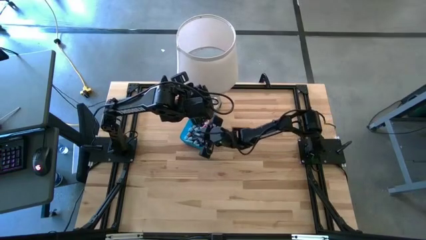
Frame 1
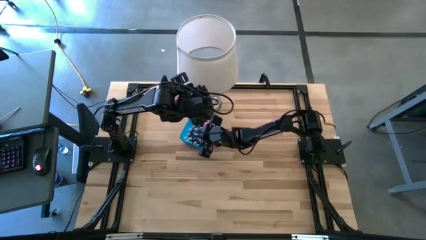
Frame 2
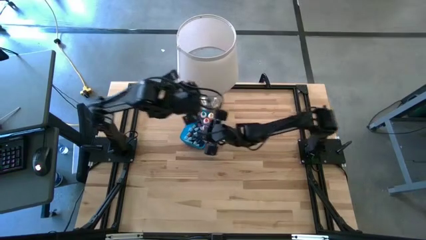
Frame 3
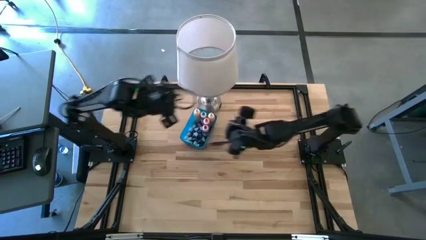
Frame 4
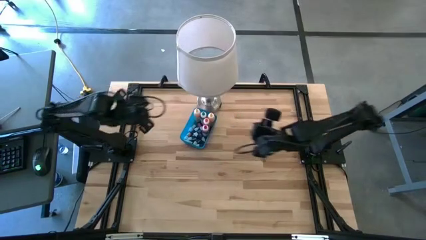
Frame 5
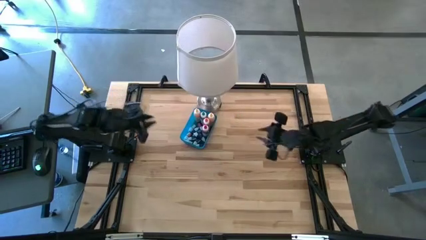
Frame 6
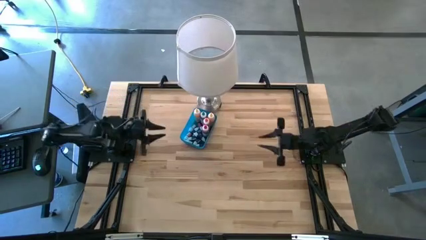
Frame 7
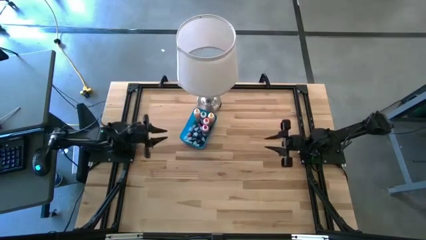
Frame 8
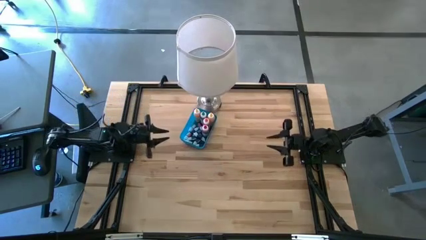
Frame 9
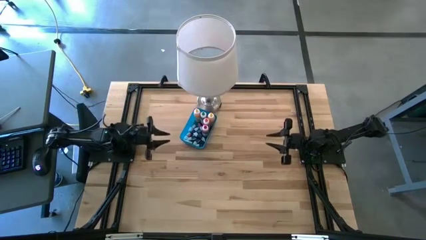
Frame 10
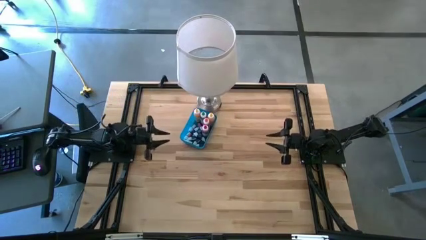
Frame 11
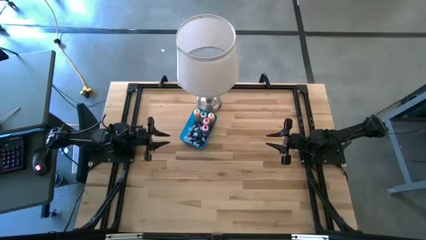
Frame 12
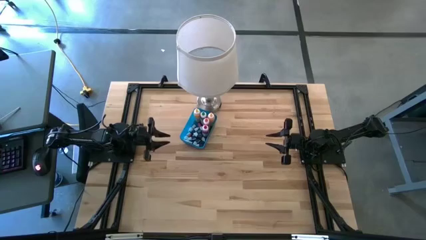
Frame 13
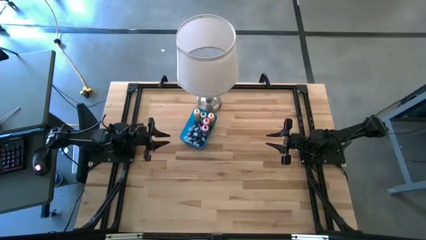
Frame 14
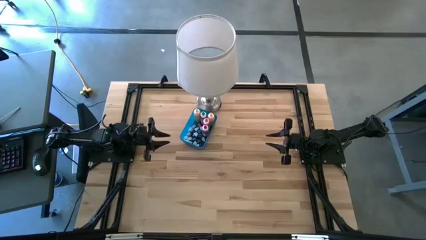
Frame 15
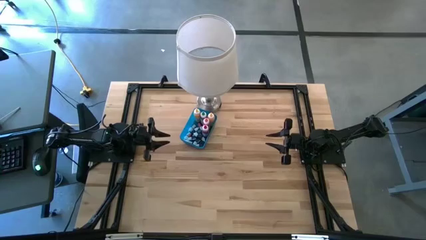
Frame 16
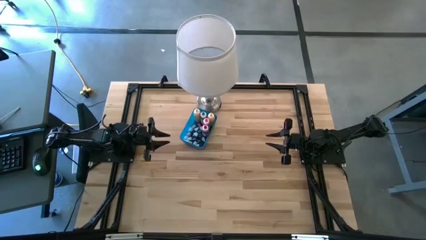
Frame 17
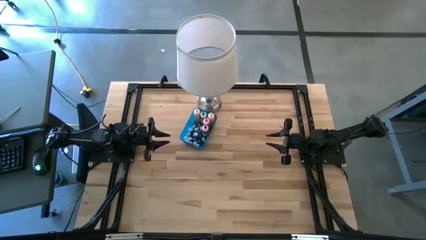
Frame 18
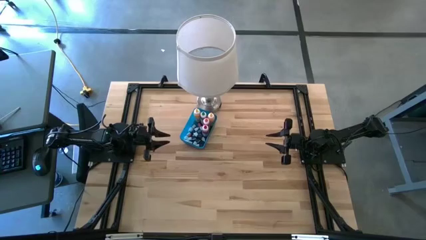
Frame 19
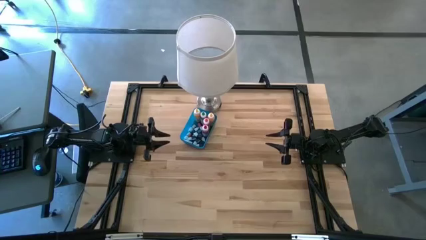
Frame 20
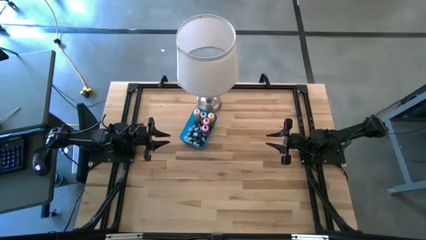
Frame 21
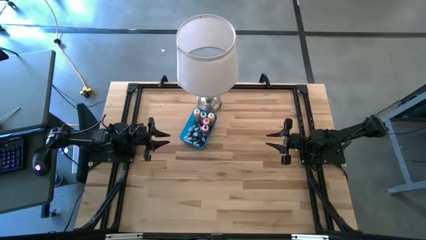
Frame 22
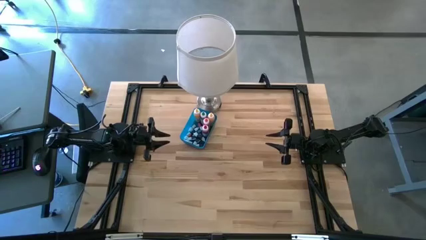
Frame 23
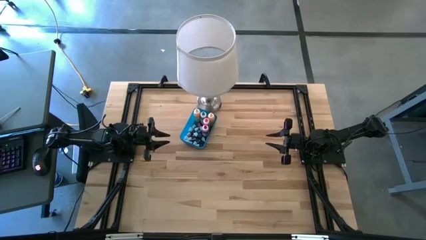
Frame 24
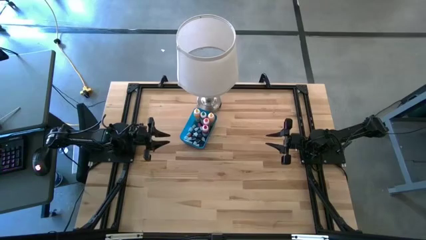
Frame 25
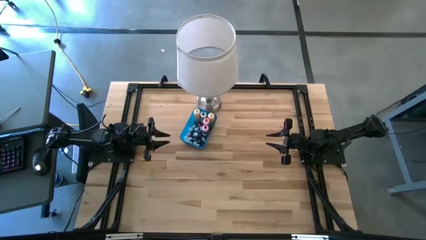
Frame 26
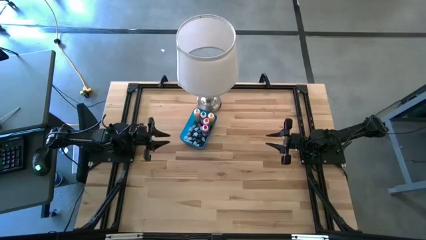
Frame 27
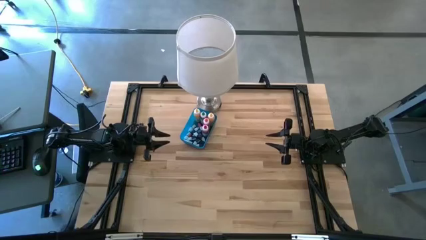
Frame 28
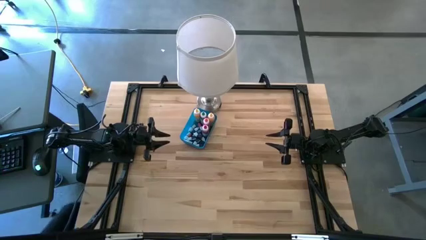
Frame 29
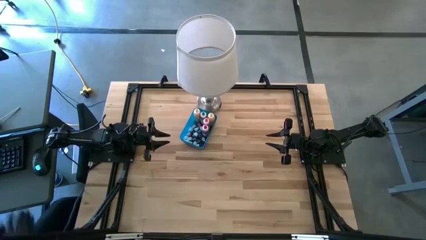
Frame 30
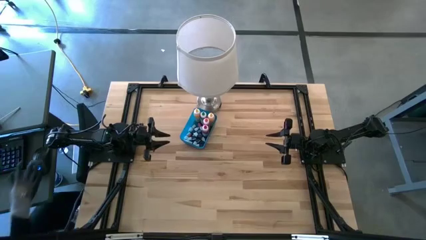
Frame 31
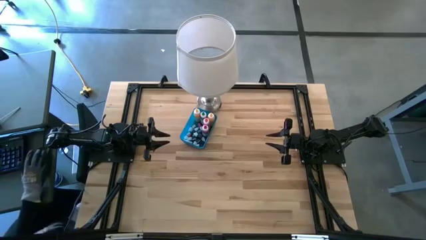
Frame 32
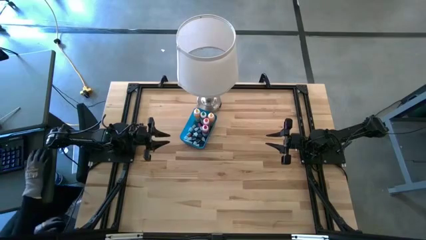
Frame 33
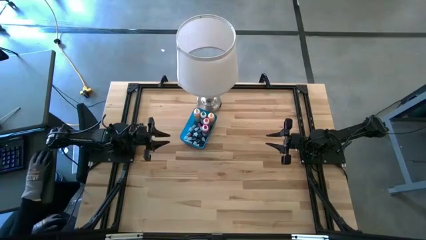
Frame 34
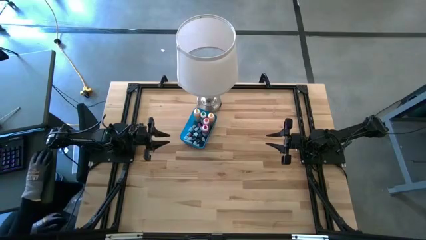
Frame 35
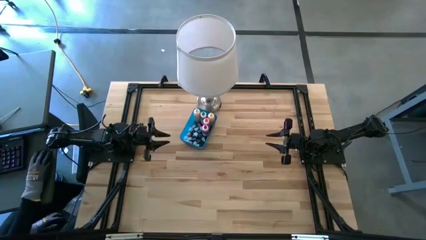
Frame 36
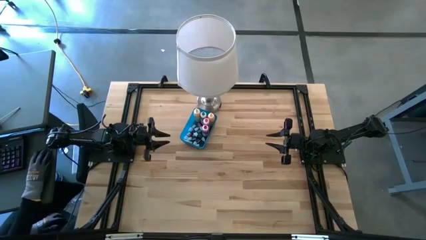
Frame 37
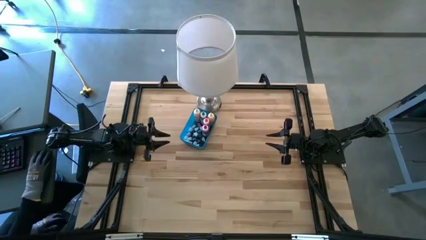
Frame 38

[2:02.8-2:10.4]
Task: Pick & Place food coloring
Return to Home Position

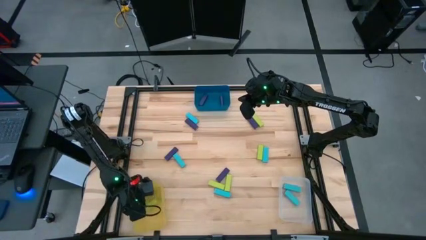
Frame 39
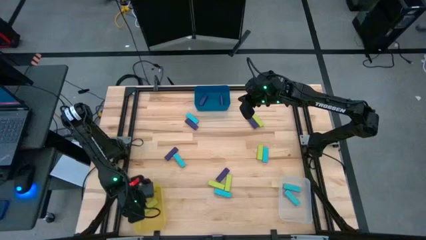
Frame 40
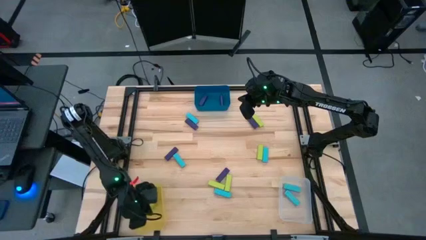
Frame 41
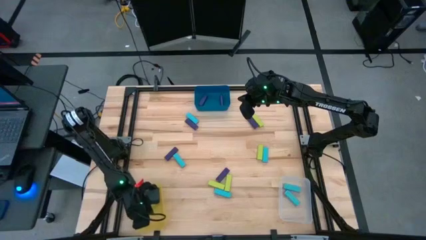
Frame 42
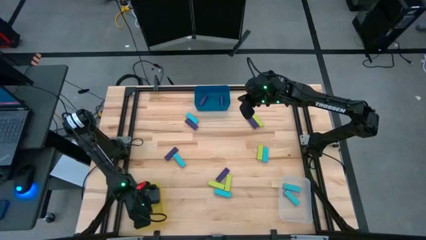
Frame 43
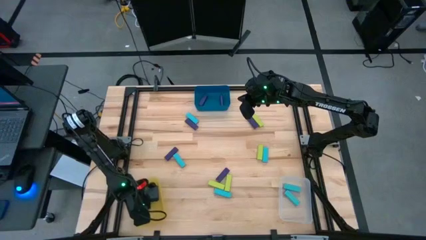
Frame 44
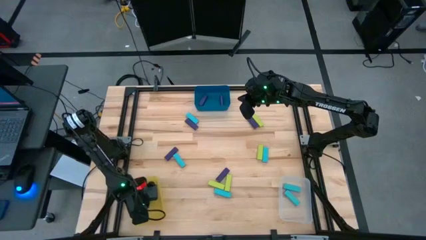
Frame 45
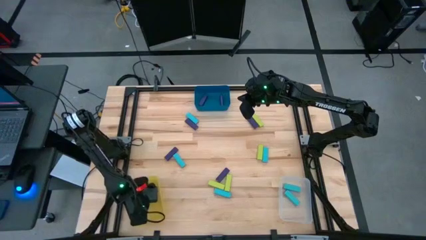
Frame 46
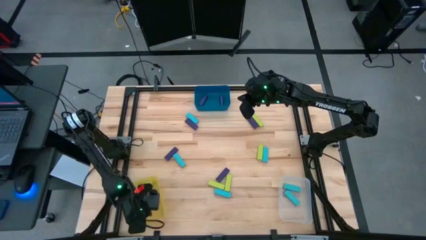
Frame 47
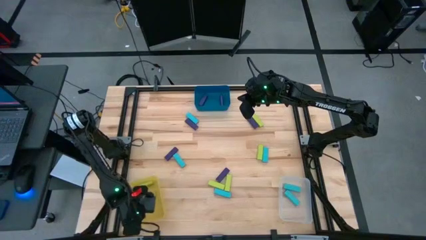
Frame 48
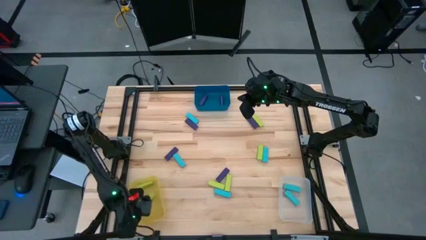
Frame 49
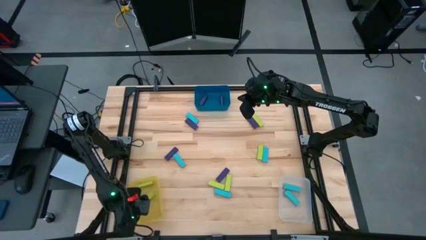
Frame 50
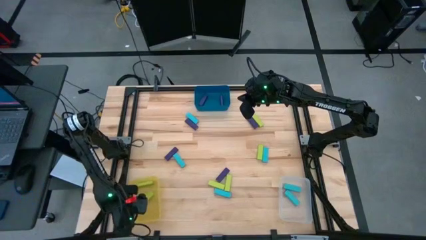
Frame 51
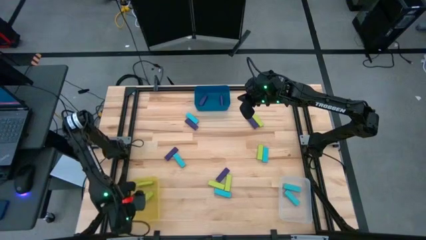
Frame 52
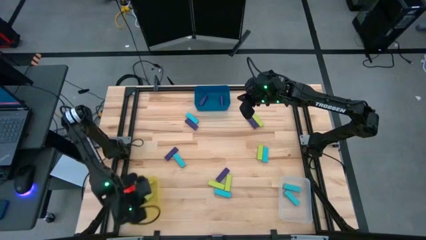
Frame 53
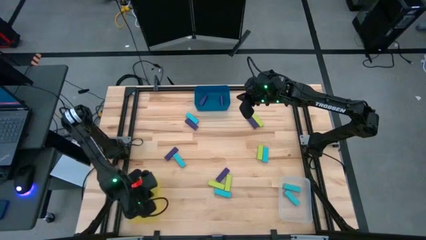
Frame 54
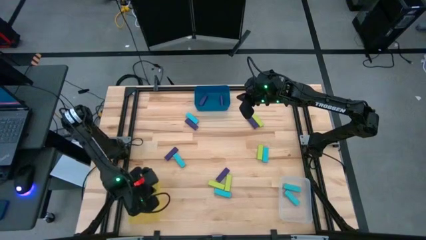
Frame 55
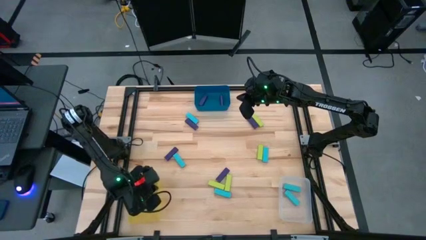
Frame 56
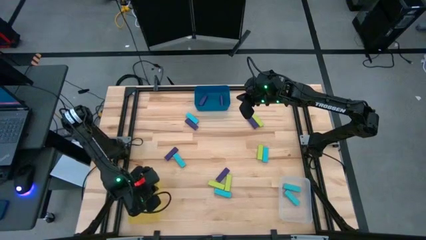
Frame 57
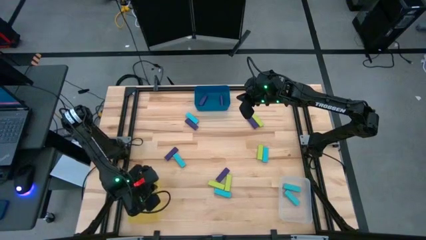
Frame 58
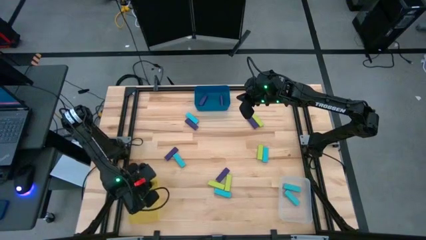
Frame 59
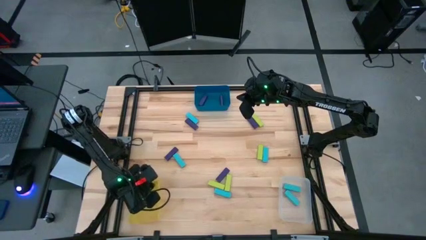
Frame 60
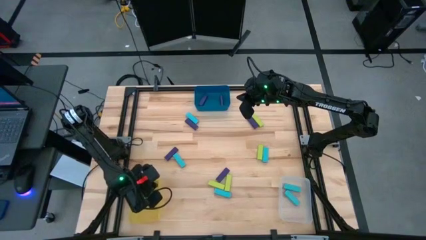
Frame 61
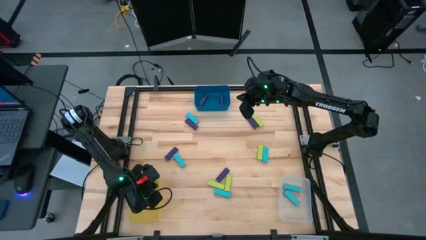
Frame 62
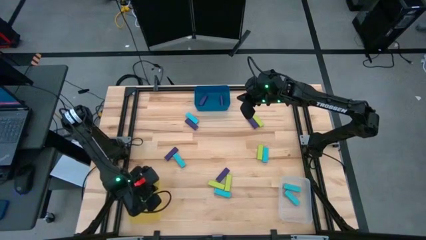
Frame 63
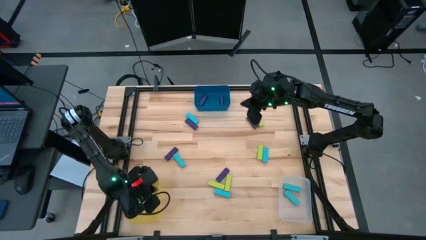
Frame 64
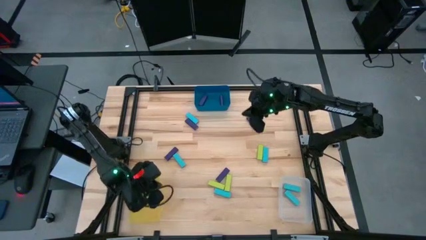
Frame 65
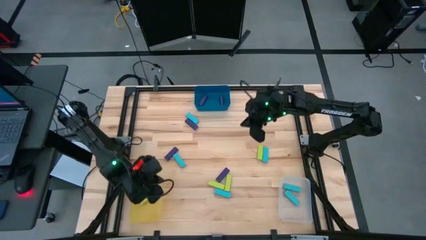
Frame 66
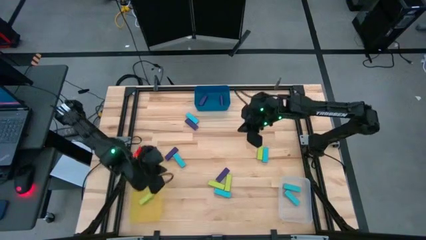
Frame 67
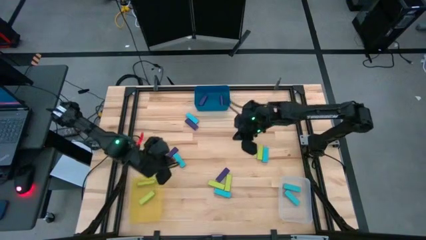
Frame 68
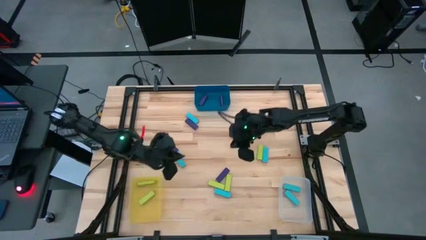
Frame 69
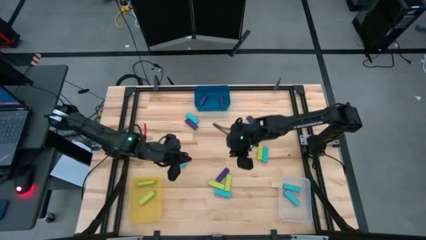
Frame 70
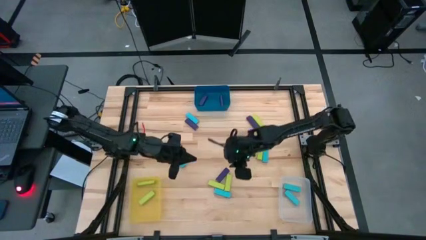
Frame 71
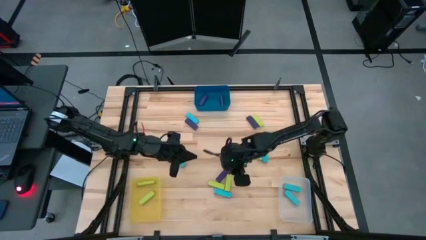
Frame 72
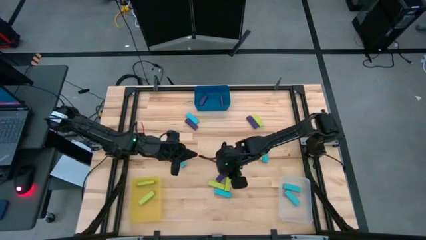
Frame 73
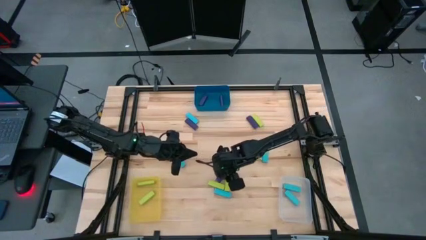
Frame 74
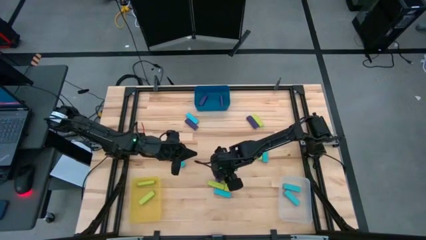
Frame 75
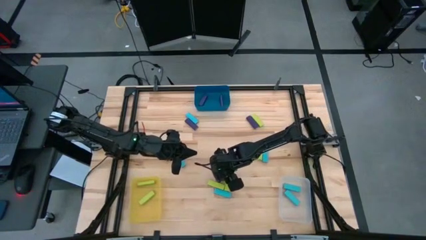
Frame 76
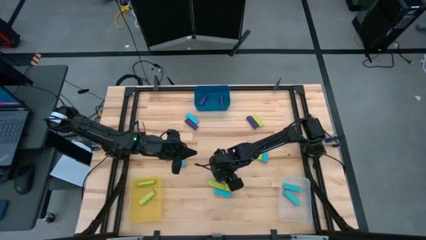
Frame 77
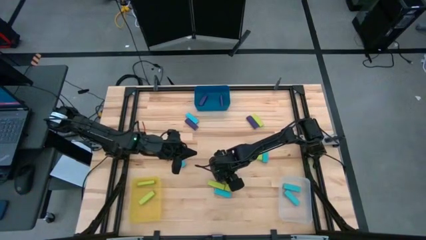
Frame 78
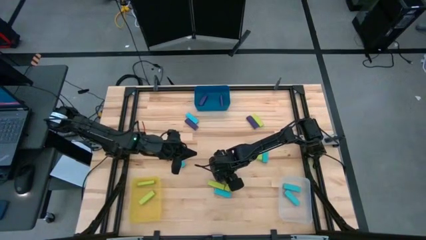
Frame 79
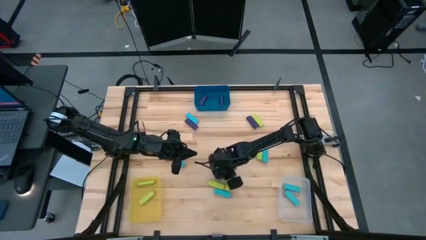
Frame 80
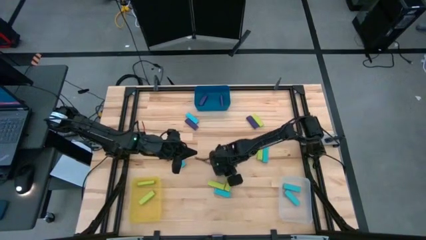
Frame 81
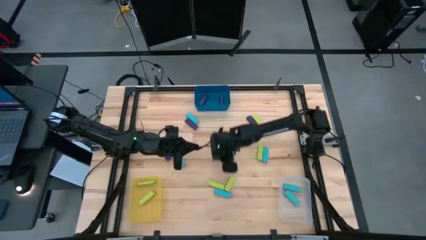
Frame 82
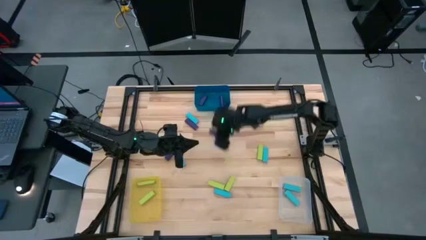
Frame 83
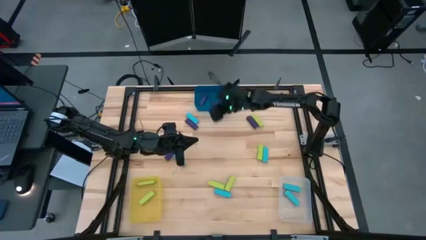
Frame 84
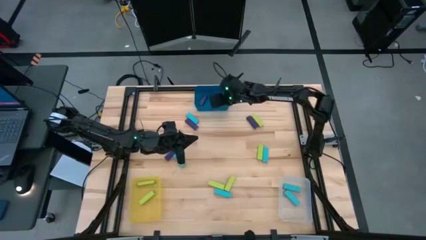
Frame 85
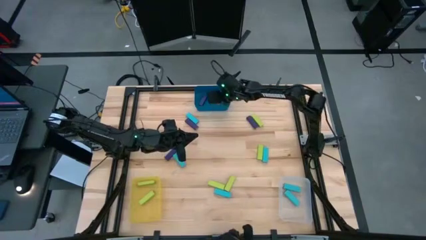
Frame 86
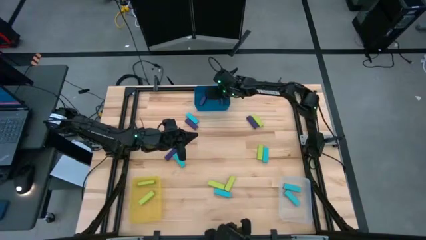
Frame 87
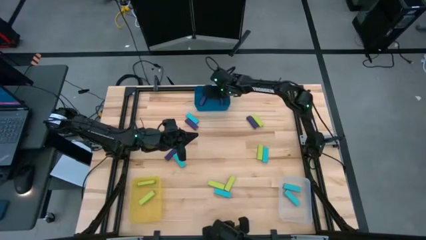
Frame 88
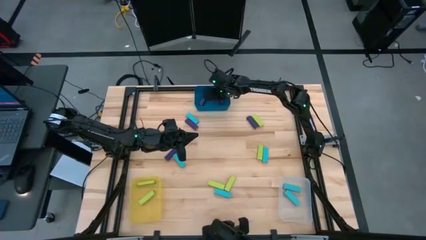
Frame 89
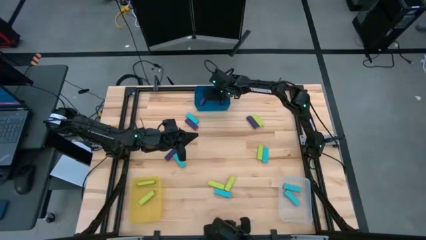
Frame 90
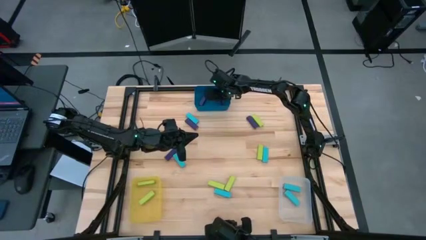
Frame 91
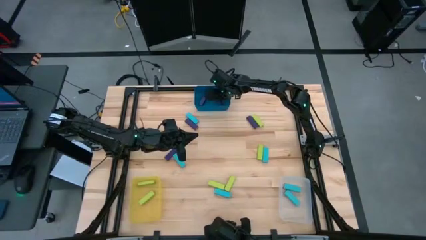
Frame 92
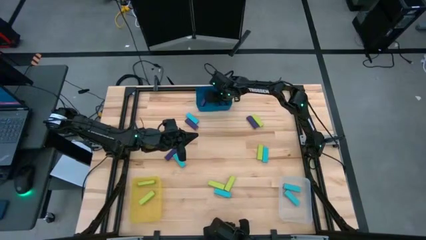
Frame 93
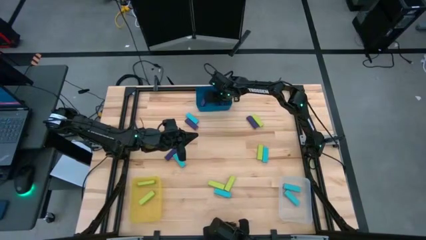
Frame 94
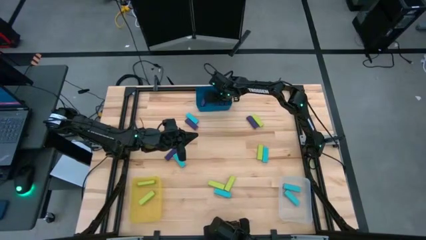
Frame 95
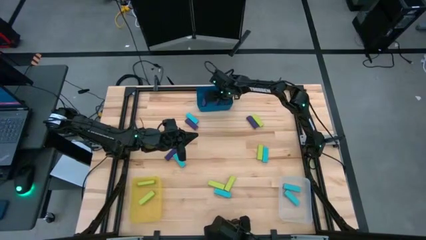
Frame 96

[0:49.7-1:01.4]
Task: Sort blocks
Put the purple block into the blue bin
